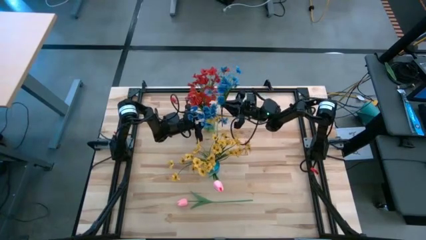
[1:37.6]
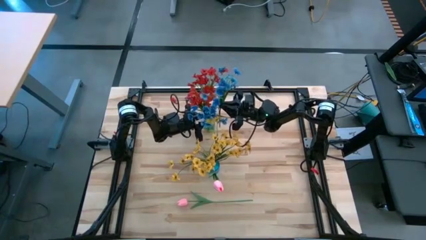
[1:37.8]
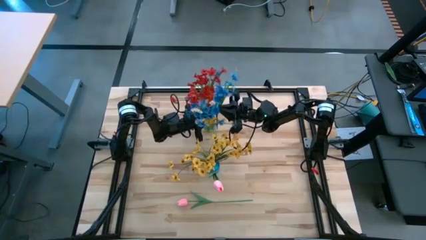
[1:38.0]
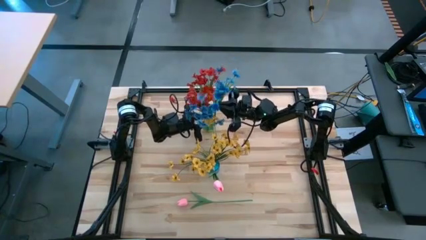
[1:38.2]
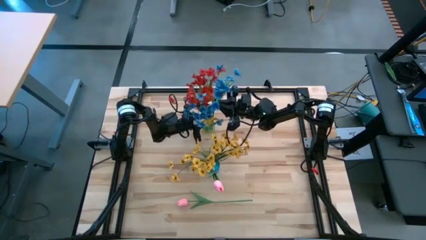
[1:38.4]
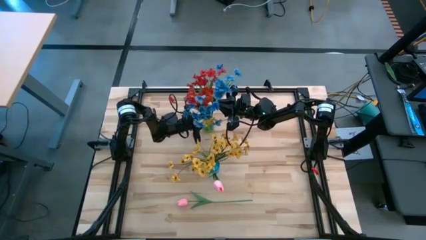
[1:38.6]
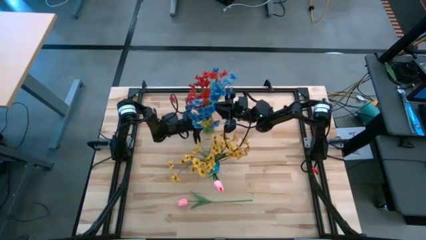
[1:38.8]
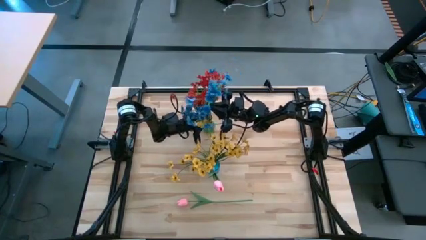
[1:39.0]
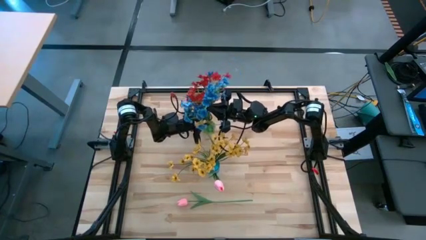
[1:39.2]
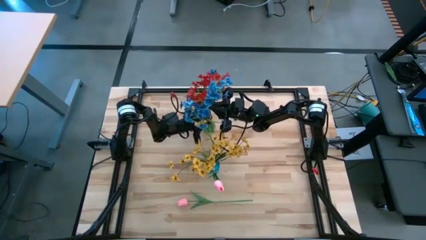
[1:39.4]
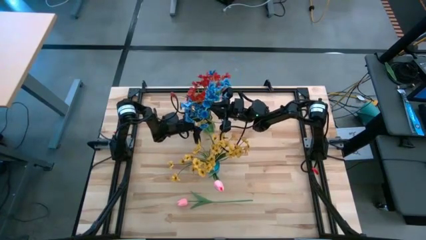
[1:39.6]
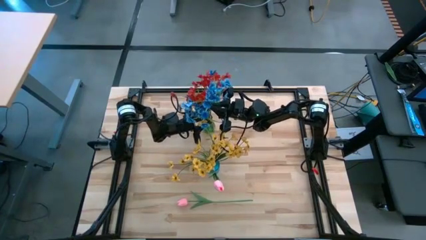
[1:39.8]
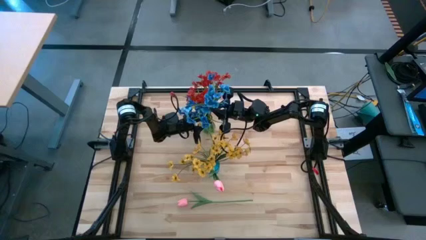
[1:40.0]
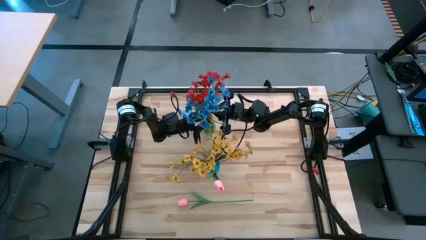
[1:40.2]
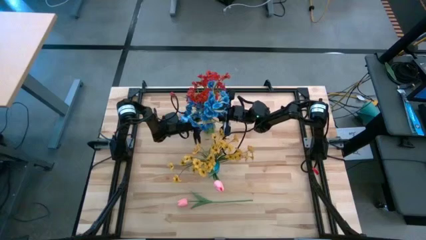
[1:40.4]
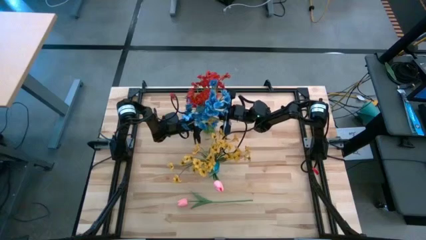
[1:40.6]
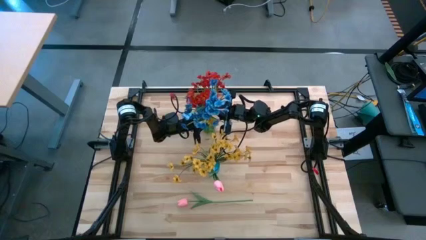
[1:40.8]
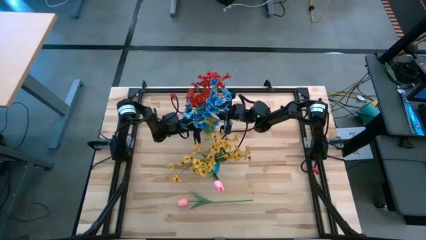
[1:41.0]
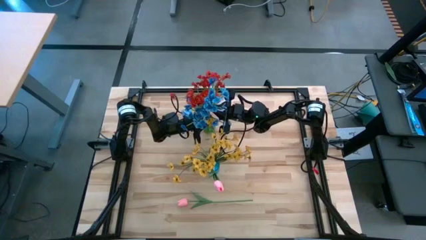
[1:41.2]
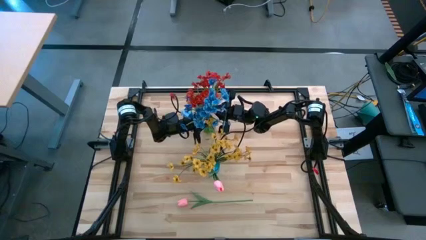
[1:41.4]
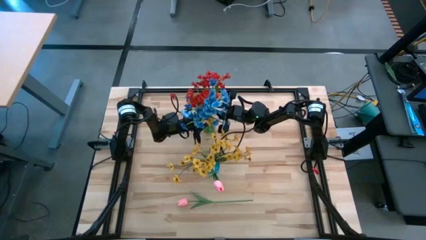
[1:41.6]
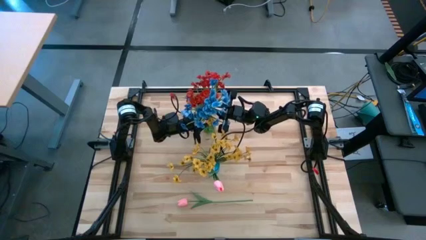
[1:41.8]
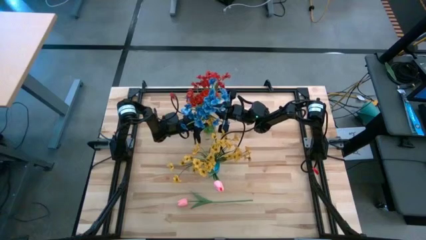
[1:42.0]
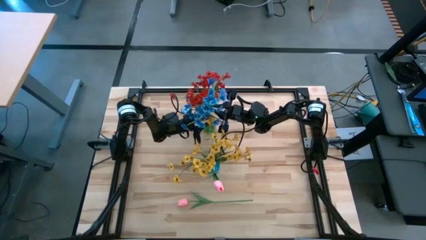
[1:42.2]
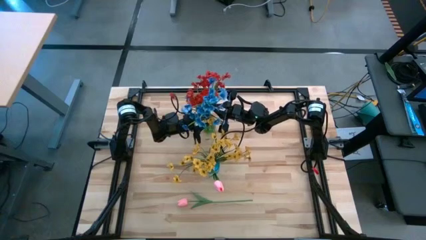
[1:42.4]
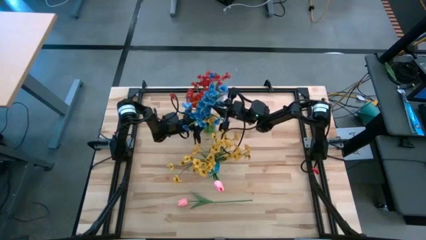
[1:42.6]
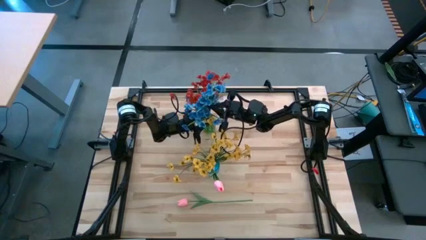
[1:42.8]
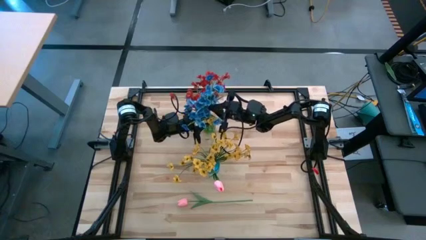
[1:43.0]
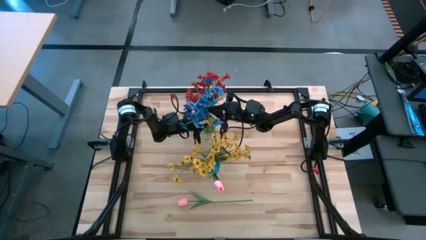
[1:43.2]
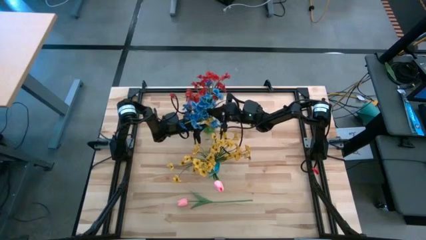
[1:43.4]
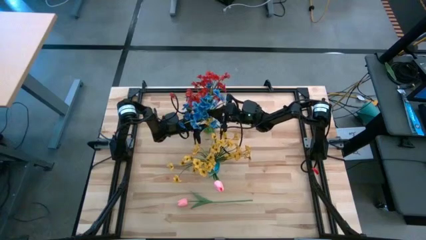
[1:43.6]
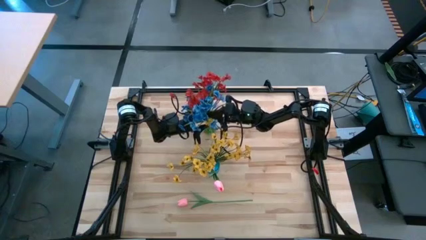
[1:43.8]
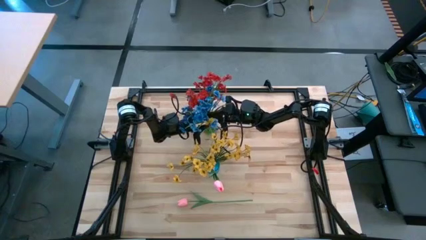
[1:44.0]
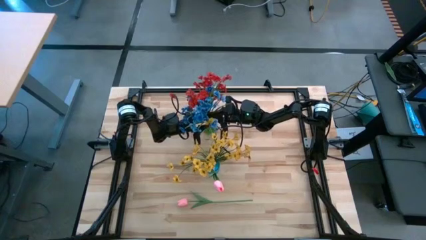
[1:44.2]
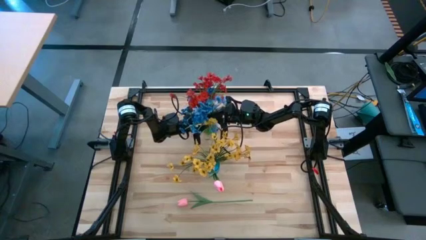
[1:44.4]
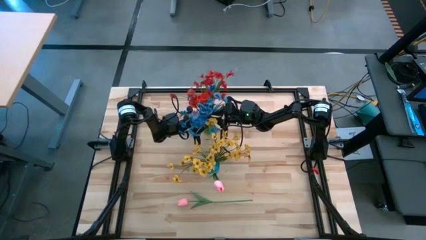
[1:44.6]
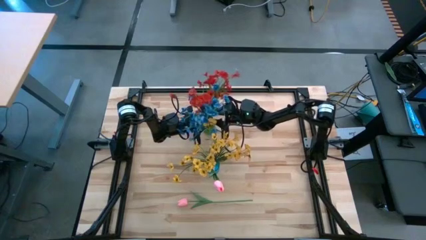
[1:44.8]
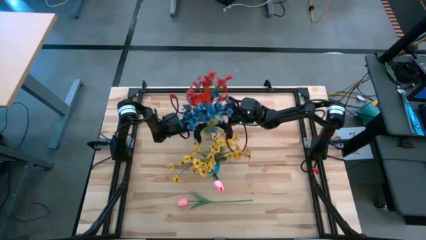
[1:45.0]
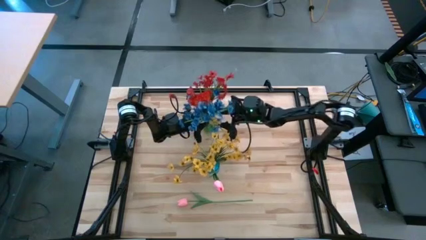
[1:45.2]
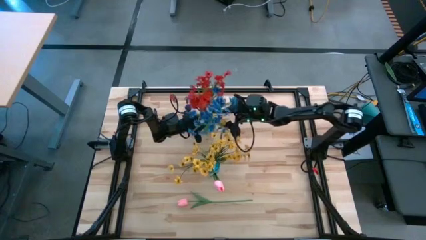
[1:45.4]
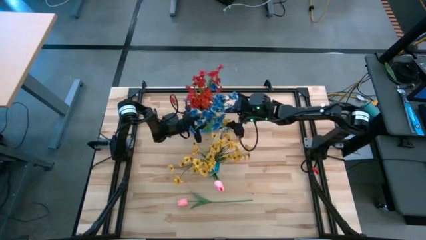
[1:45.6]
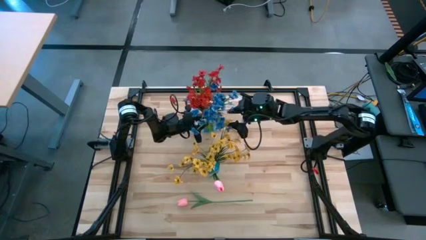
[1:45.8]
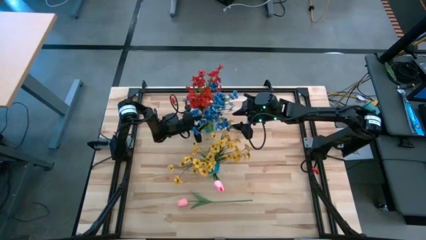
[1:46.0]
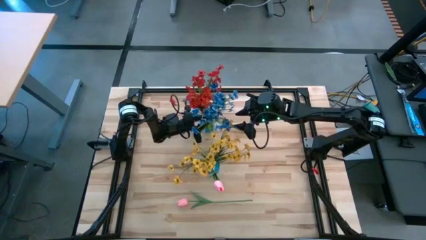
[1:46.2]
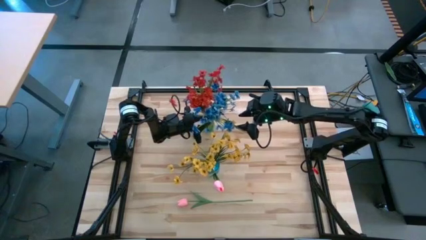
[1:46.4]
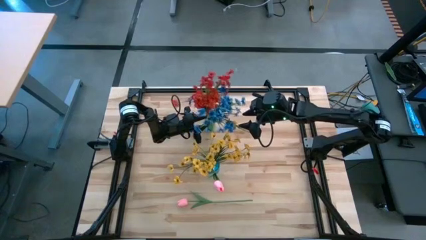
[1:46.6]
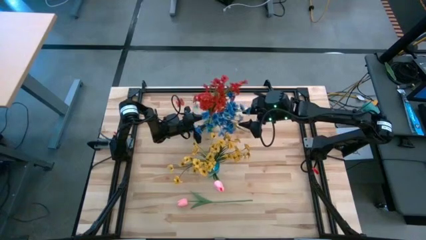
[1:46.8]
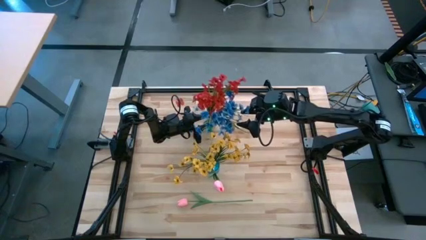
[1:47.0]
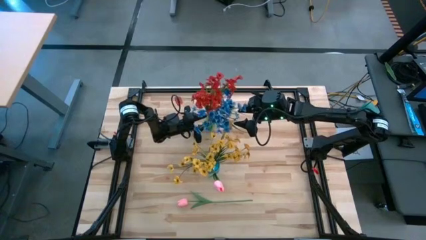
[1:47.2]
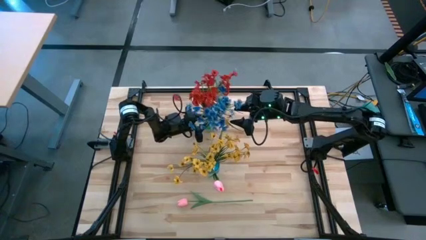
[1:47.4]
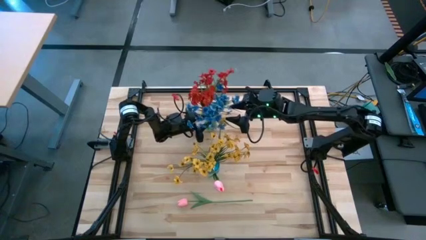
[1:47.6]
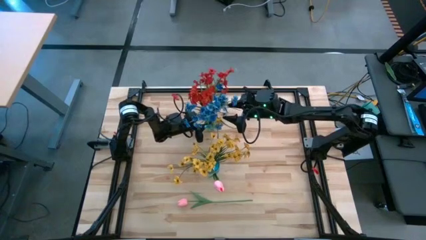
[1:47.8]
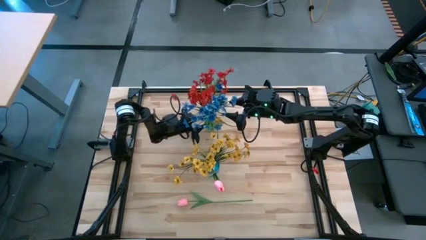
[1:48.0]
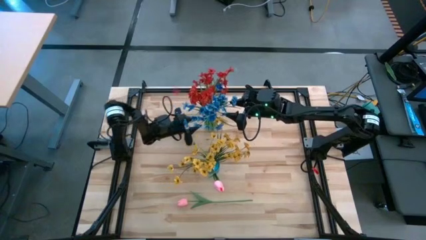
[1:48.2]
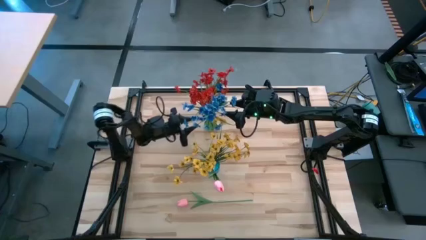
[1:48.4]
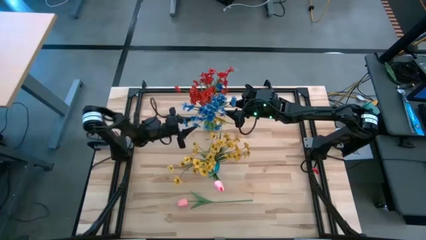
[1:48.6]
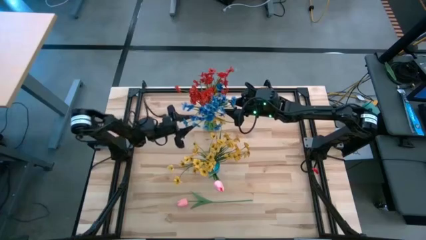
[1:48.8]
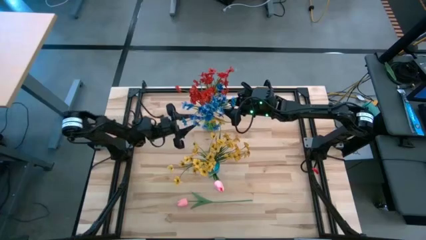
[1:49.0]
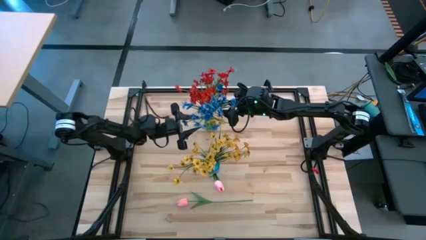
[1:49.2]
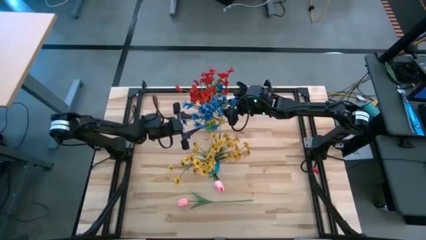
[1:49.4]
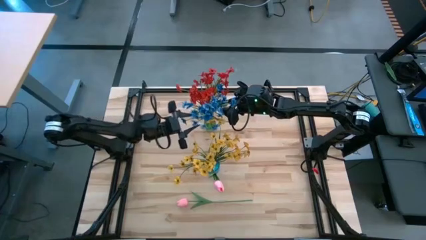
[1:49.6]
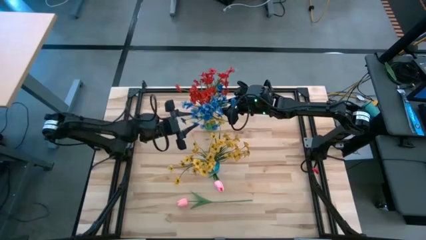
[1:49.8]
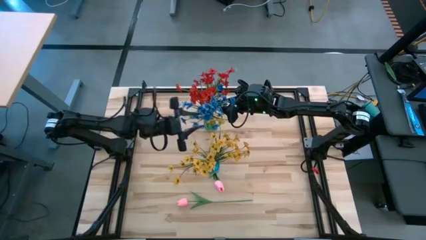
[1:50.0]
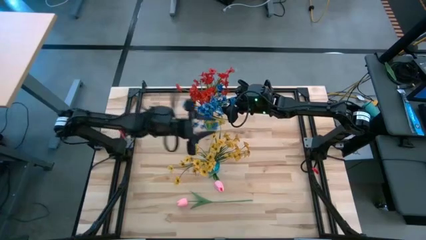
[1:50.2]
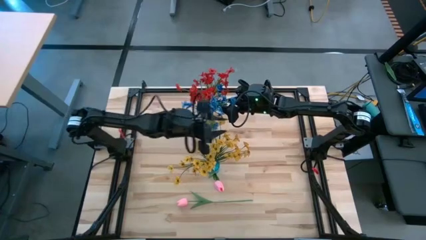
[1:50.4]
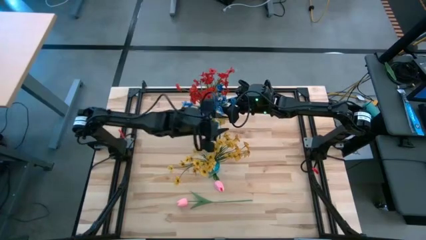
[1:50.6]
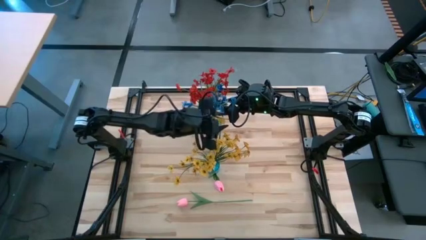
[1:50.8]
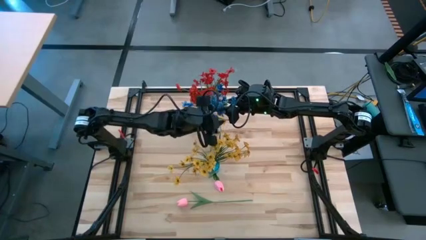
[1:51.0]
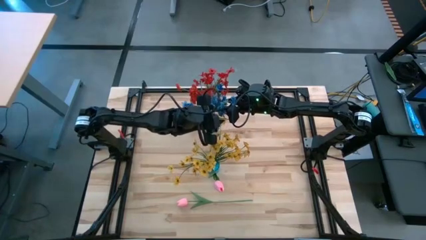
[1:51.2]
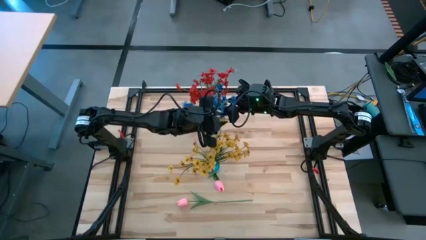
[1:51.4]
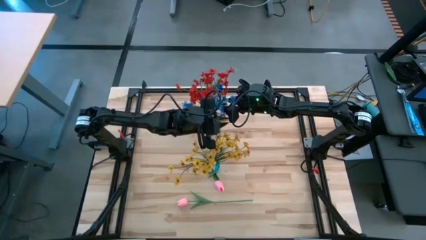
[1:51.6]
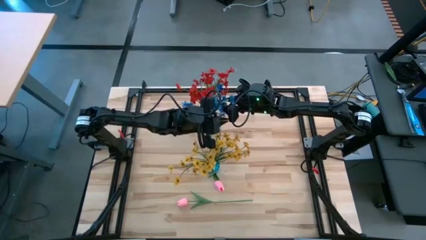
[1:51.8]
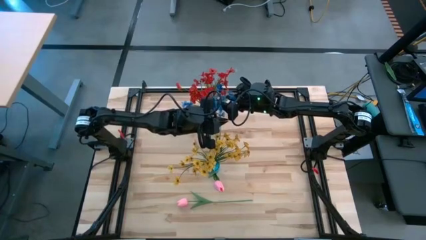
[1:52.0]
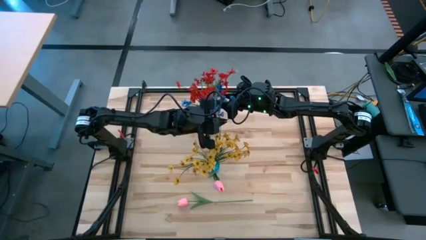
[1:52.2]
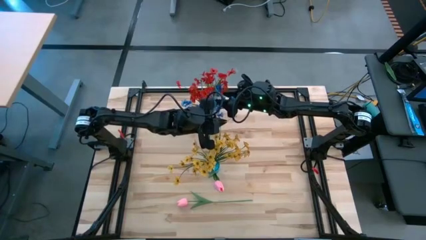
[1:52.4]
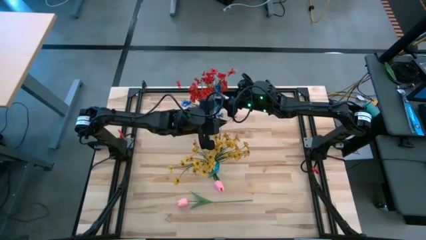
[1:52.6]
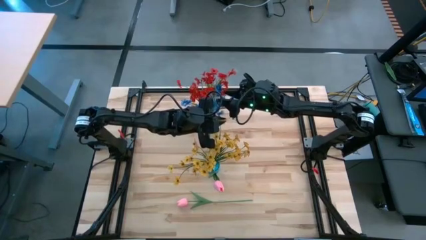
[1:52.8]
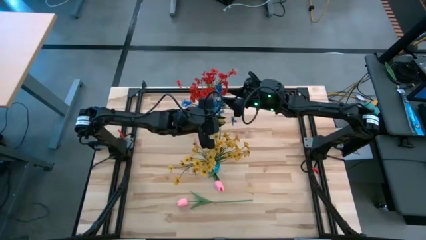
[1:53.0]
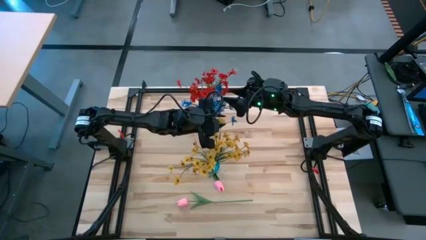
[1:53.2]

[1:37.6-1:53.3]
Task: Sort flowers into vase by color
Put the blue flowers into the green vase
